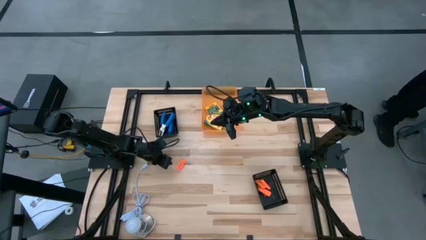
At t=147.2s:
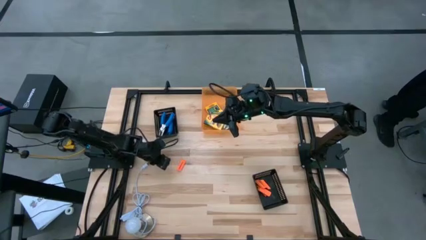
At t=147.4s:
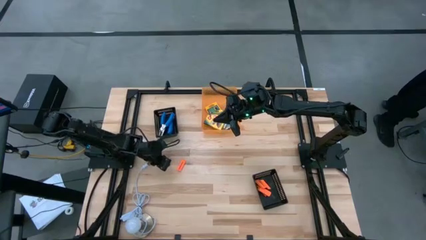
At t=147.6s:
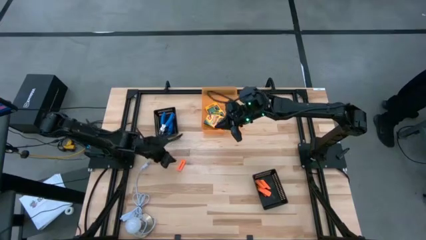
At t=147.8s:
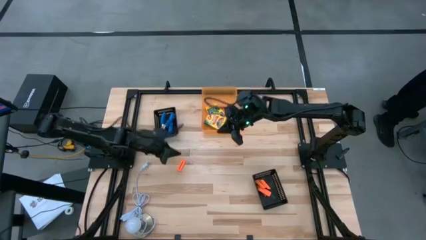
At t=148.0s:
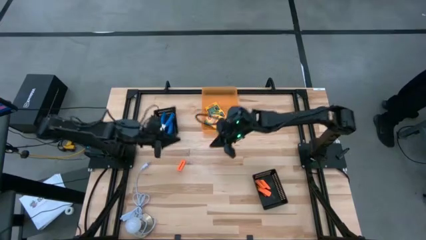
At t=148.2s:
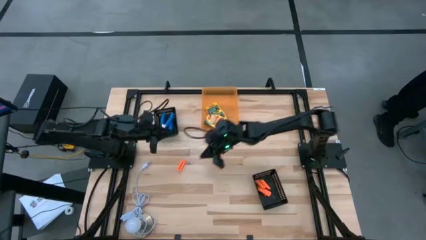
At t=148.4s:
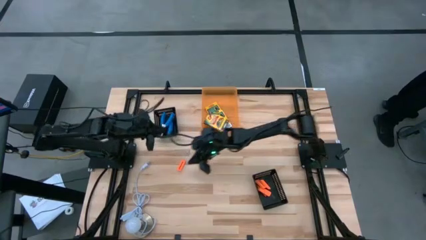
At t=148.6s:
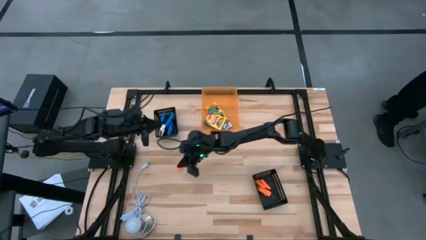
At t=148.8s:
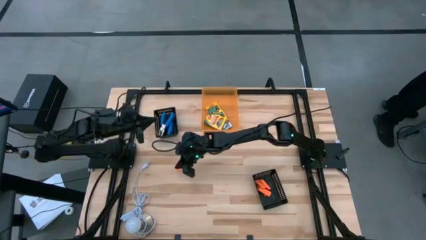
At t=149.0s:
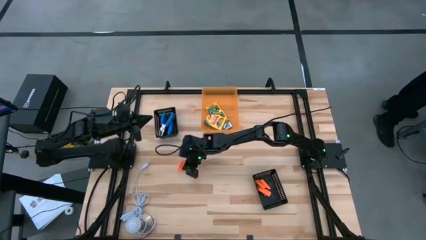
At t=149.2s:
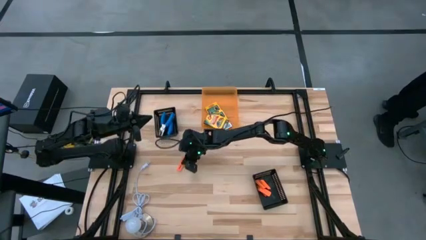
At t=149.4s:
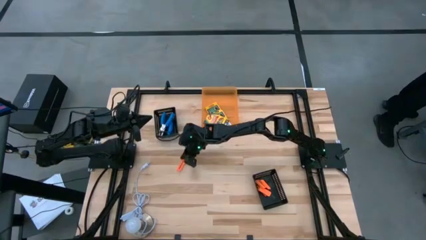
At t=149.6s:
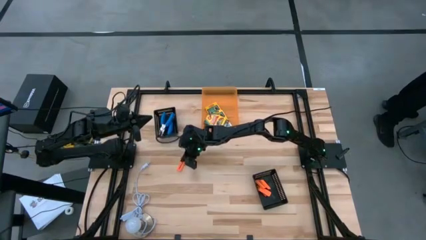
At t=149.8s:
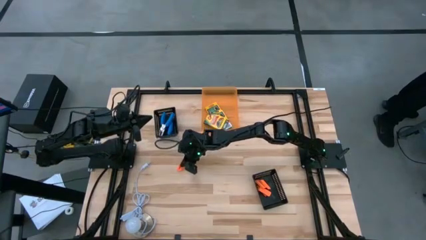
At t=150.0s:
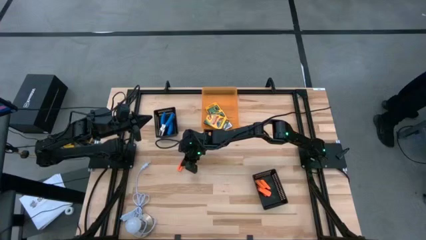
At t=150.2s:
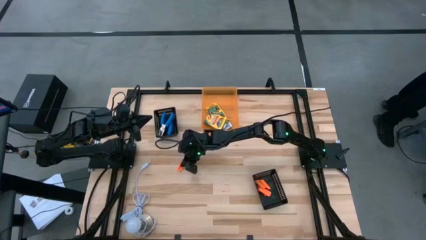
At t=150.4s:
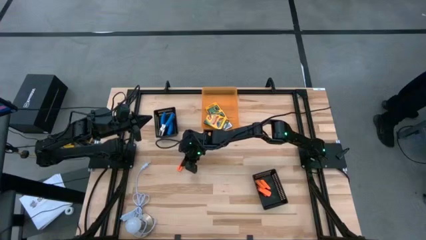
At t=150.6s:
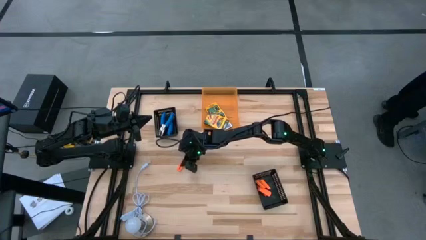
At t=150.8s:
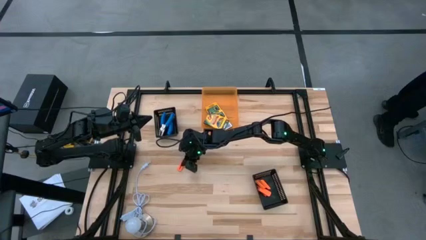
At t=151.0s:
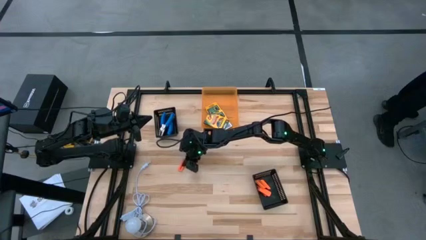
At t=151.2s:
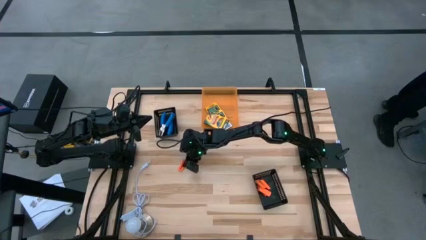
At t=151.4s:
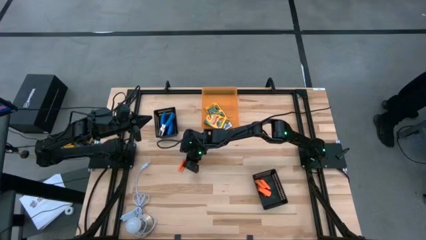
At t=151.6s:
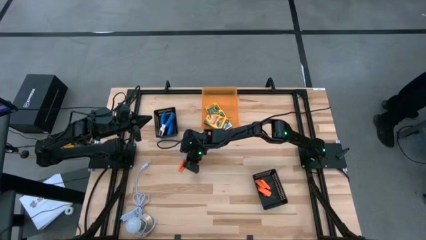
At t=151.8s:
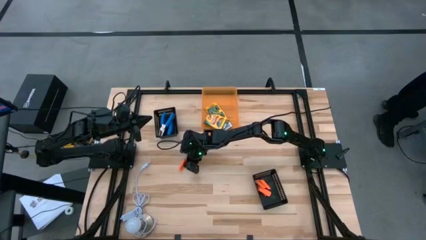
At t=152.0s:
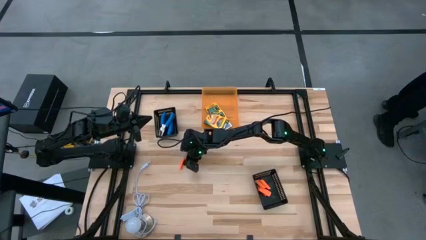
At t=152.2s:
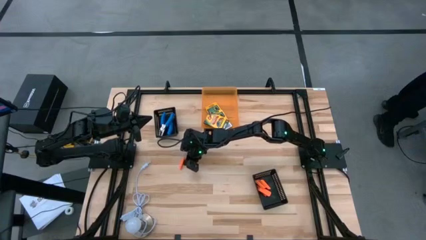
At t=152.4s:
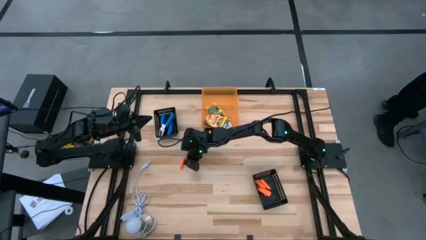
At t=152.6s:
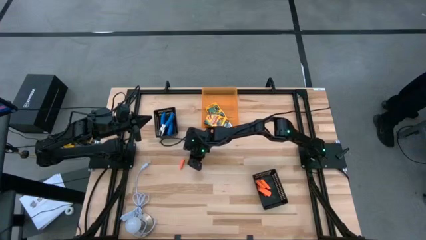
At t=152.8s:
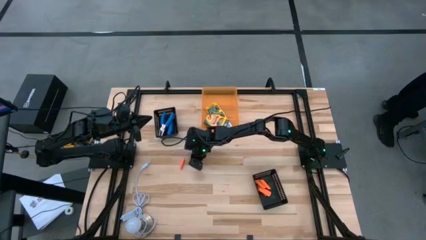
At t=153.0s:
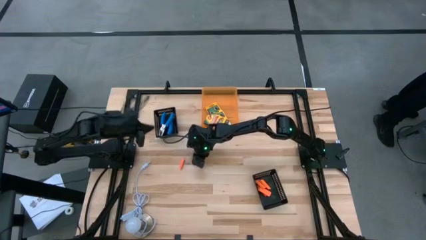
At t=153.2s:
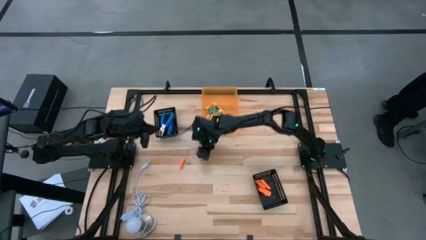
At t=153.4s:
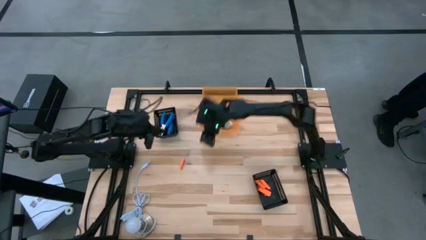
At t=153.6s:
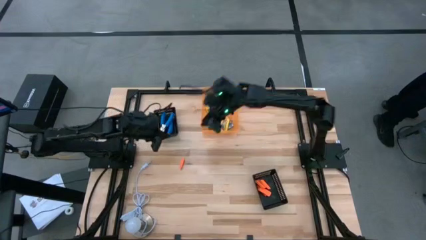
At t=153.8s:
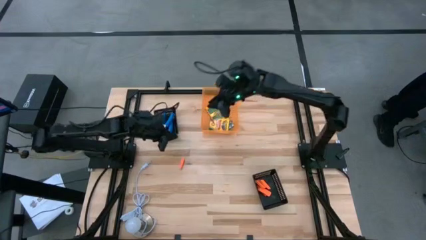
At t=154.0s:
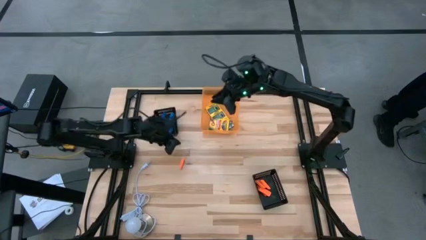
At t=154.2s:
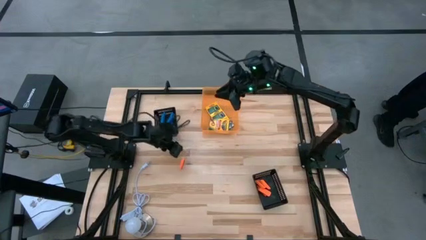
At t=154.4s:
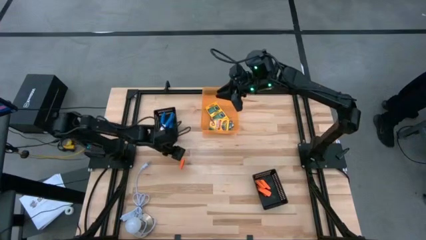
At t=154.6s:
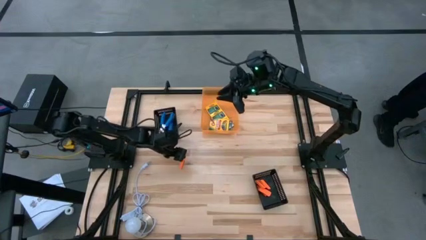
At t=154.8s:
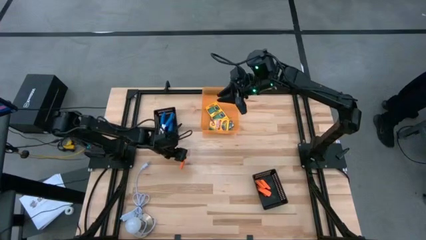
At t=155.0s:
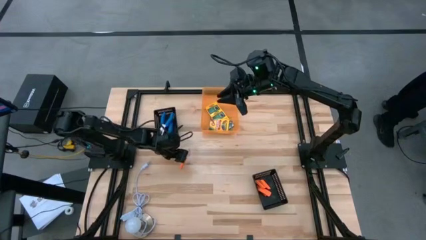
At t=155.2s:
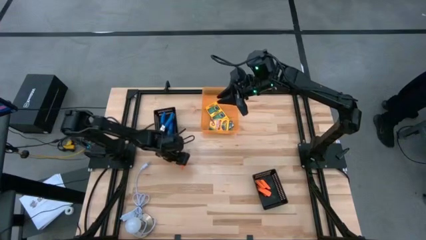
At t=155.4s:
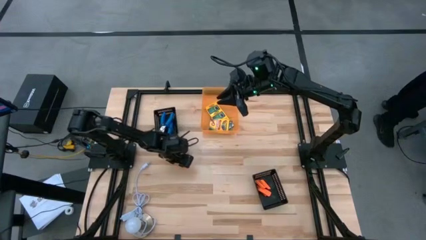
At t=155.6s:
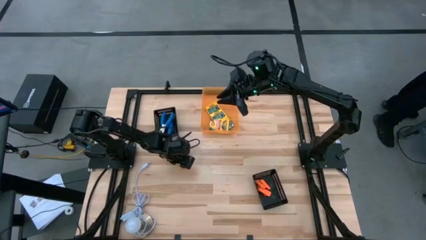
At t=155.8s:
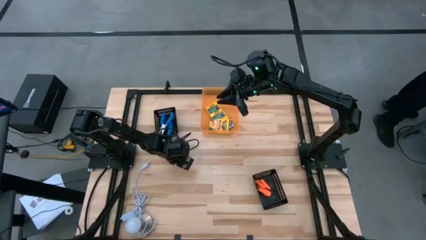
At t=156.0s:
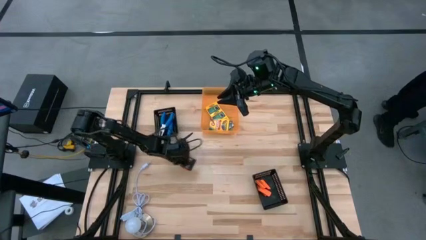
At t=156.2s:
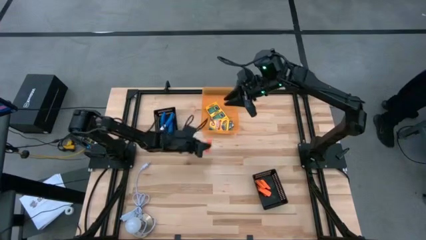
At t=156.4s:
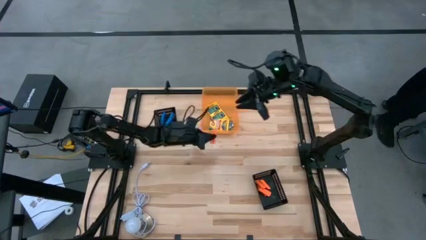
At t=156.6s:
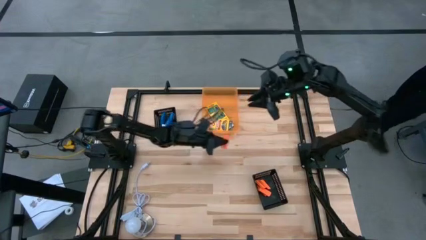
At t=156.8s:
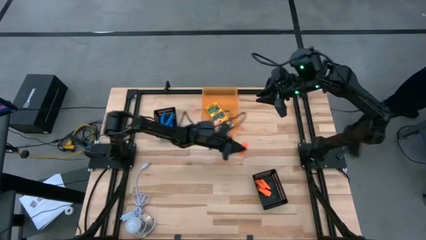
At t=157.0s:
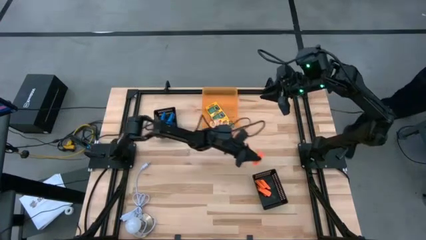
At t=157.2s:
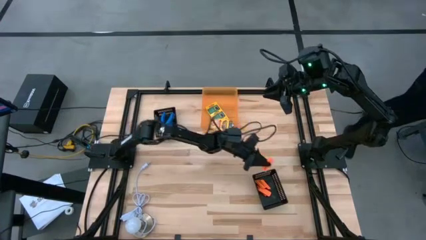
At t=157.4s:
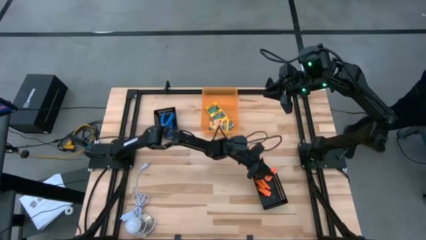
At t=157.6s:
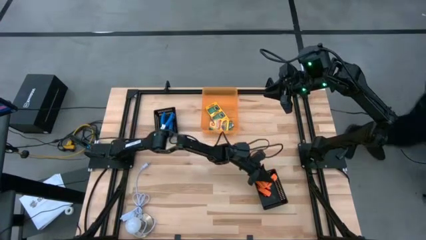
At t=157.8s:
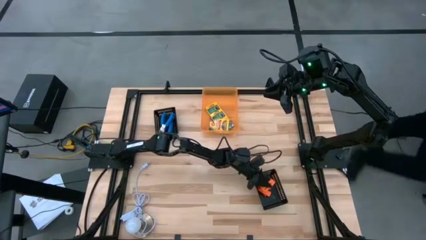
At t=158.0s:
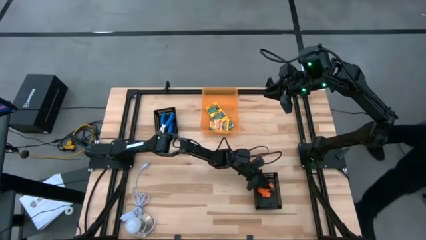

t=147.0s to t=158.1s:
Task: Pick & Place School Supplies
Put the orange eraser into the bottom black bin

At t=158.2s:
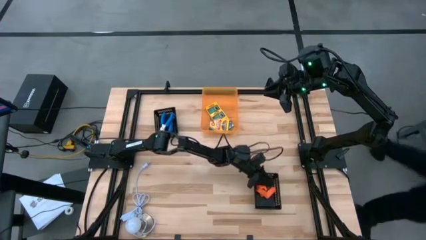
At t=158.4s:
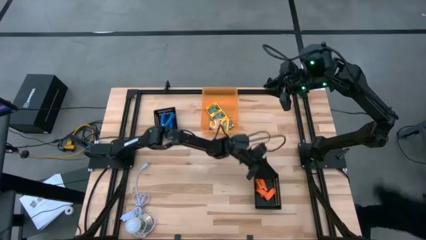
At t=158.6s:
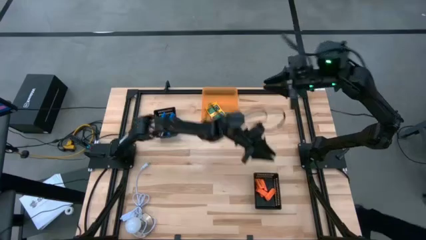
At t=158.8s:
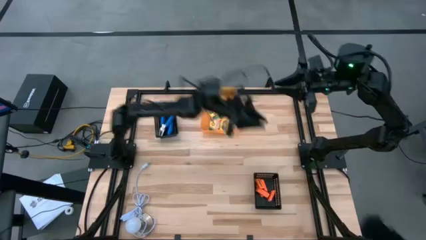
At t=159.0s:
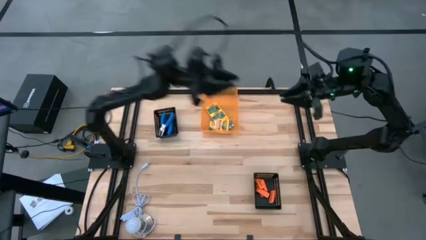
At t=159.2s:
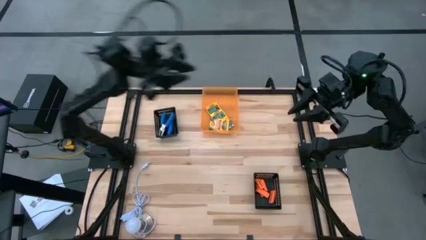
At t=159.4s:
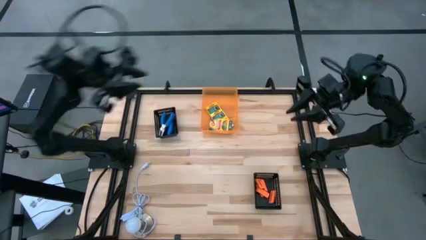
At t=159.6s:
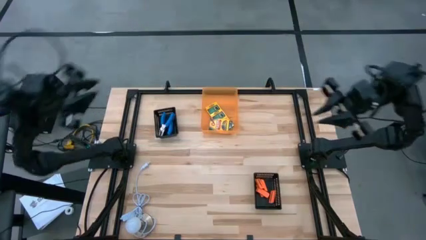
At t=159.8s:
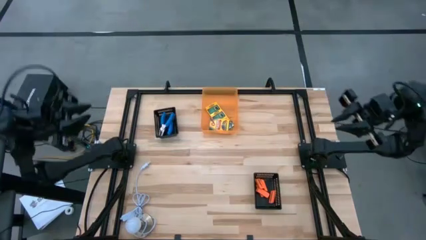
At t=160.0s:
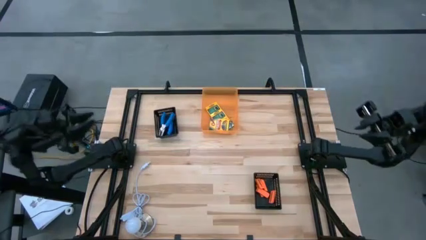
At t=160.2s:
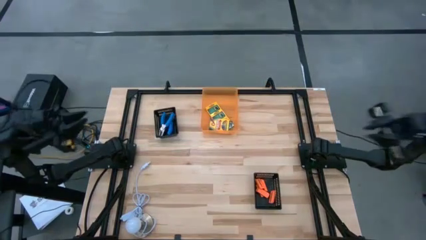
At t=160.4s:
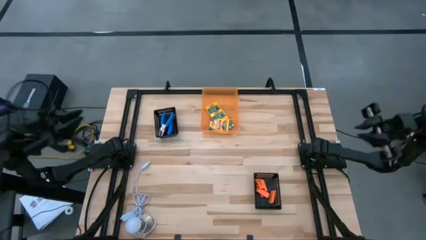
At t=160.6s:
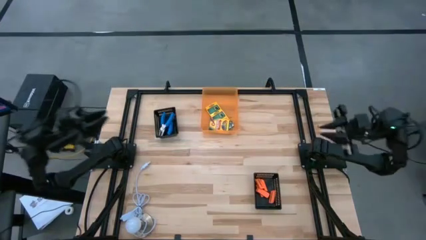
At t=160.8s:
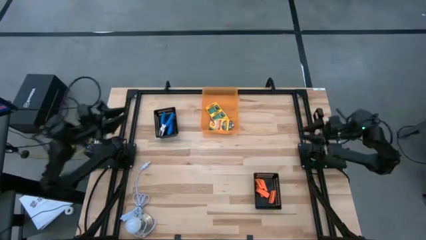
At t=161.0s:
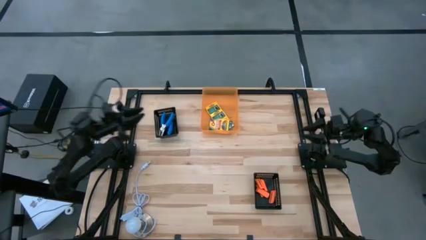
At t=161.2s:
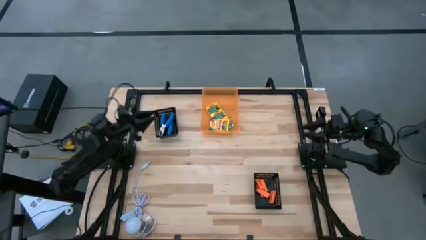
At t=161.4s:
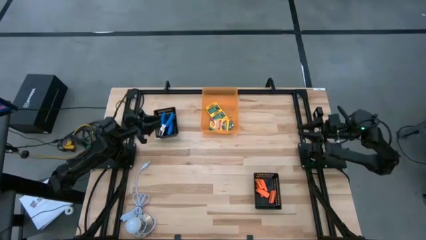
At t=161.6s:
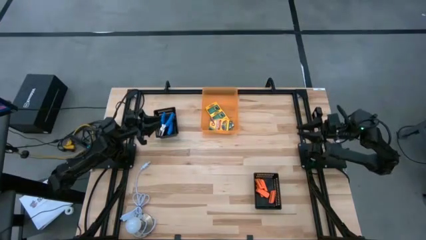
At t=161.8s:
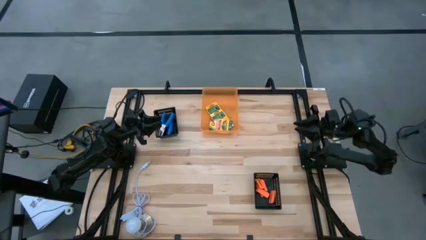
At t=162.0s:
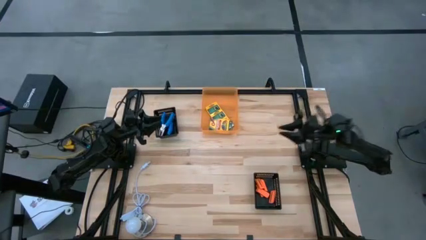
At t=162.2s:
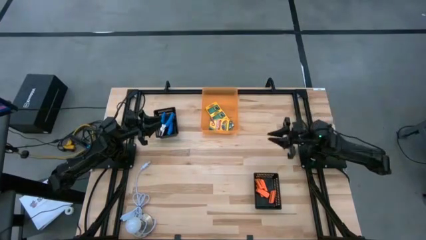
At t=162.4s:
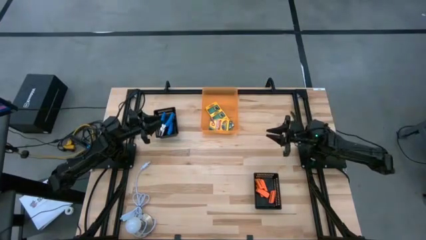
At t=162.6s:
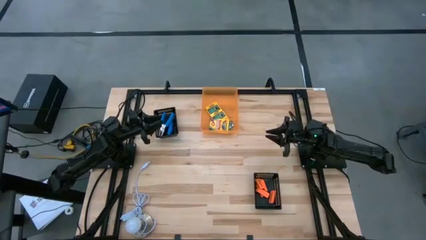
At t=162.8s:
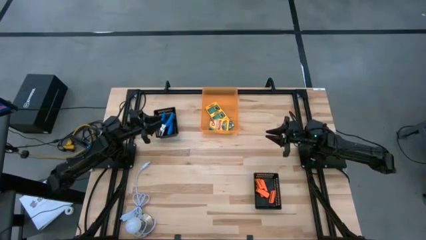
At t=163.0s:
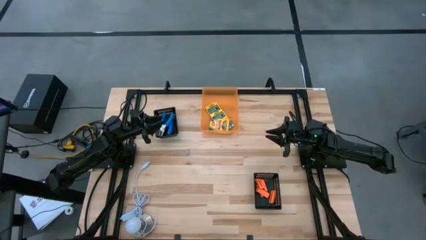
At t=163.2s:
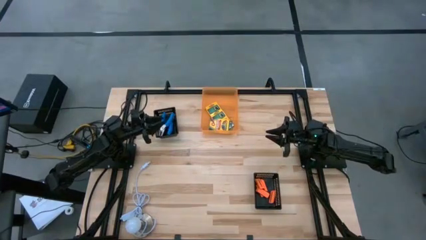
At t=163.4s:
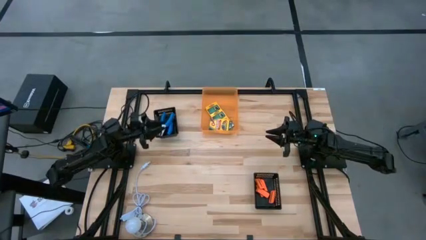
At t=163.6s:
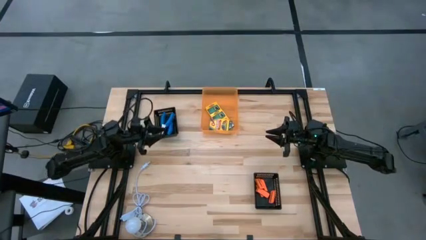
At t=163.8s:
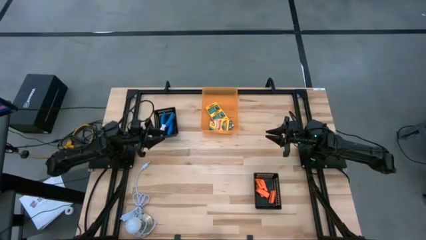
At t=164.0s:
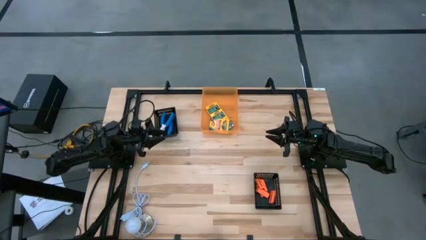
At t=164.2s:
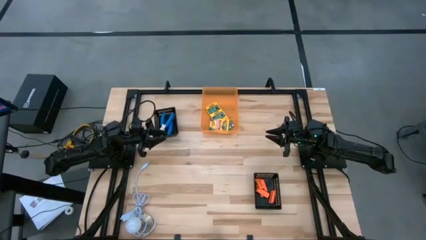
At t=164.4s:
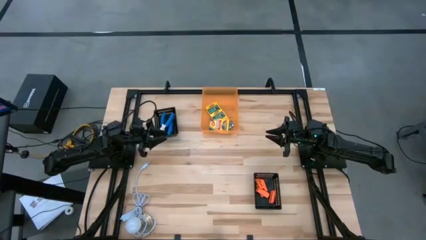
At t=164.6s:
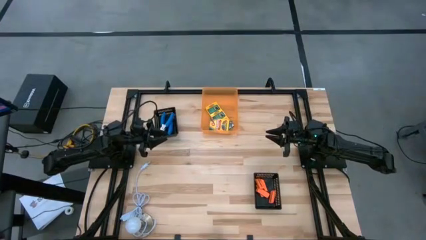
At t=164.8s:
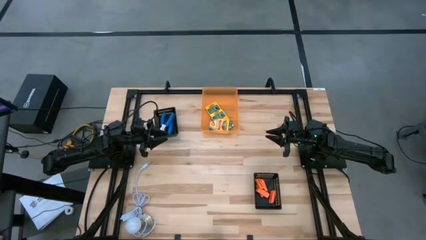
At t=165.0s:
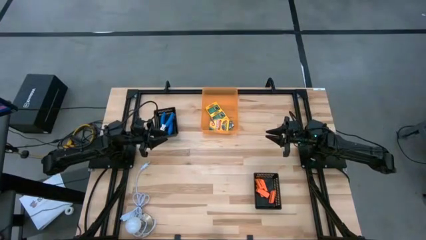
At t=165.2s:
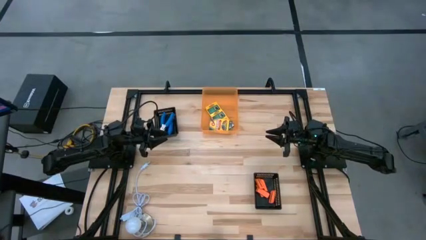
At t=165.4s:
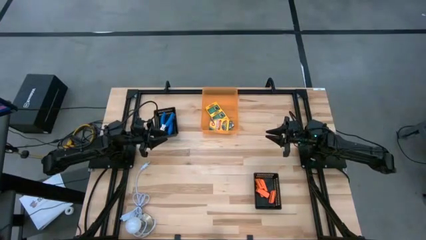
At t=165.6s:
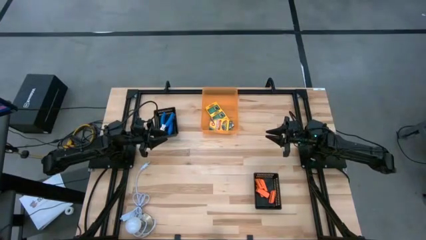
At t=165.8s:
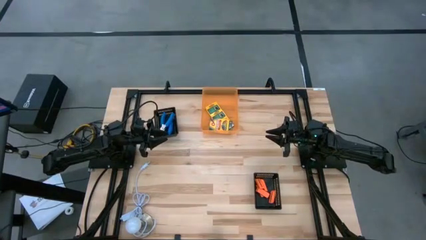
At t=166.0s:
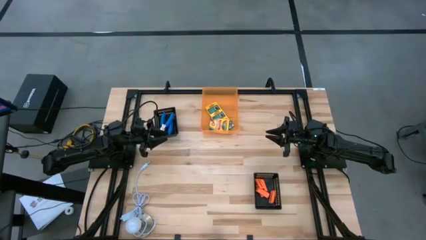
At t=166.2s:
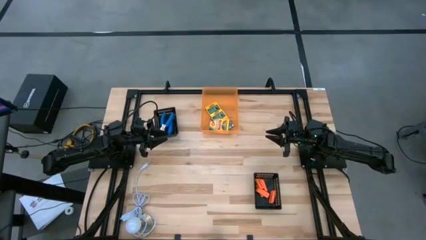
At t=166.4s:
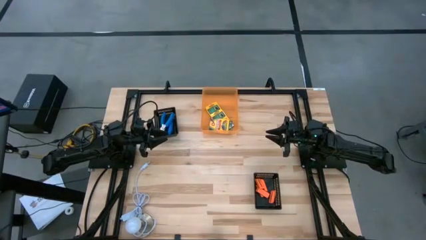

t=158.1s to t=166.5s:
Return to Home Position
